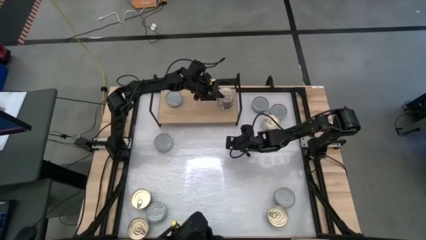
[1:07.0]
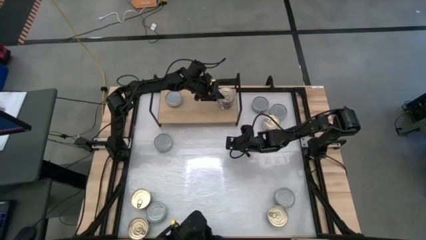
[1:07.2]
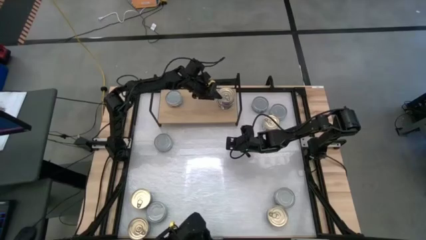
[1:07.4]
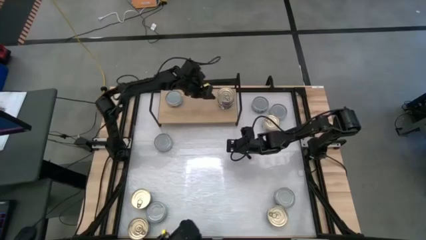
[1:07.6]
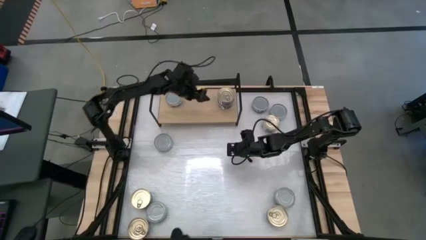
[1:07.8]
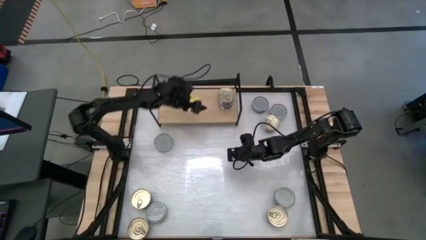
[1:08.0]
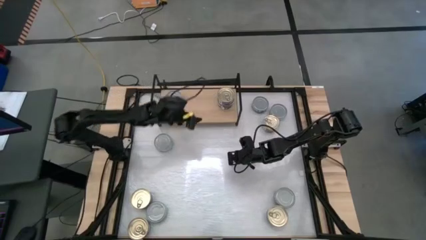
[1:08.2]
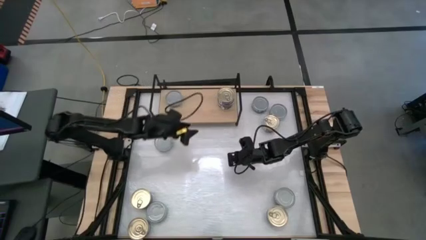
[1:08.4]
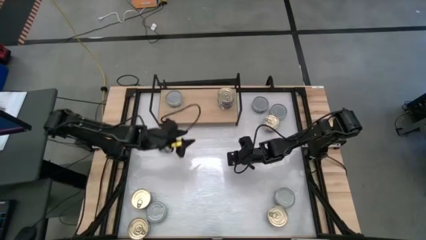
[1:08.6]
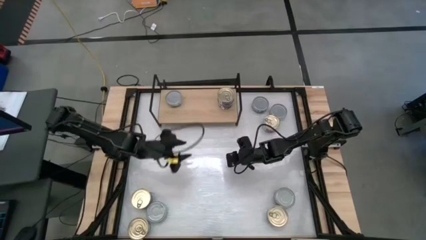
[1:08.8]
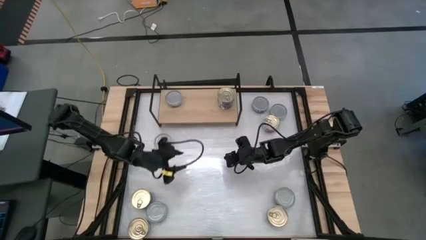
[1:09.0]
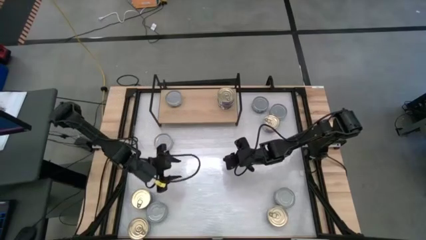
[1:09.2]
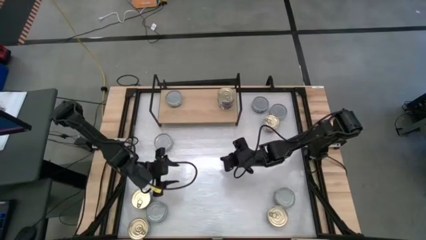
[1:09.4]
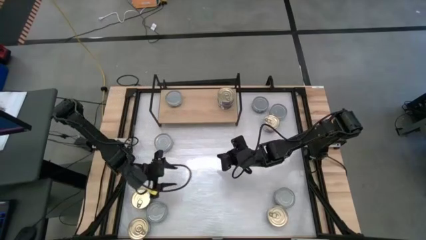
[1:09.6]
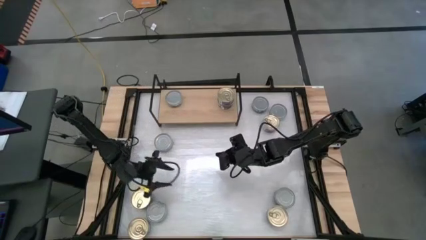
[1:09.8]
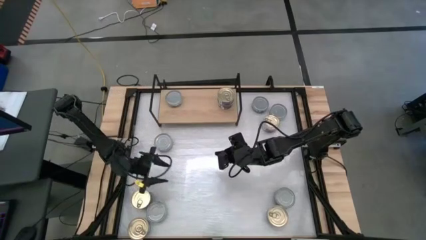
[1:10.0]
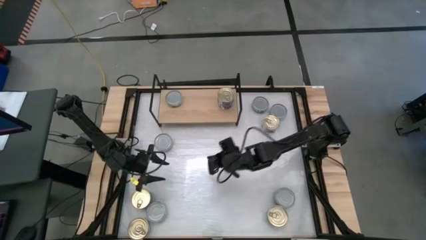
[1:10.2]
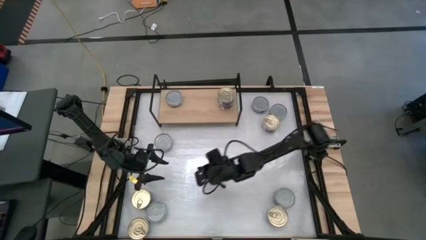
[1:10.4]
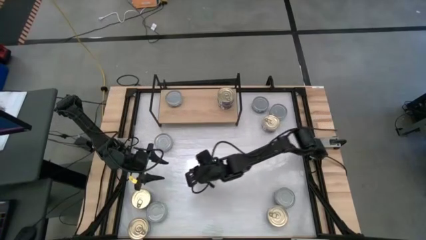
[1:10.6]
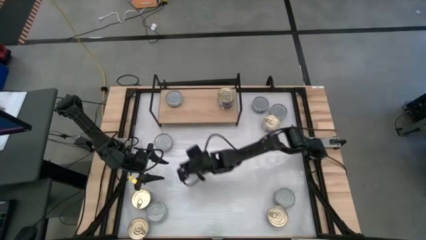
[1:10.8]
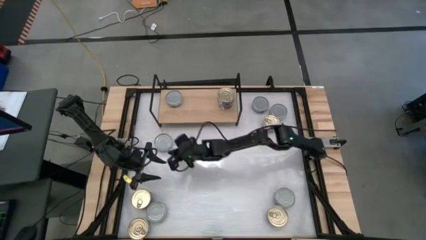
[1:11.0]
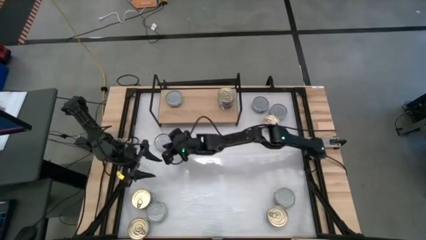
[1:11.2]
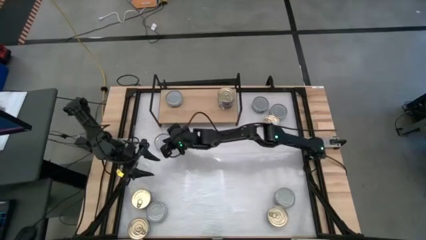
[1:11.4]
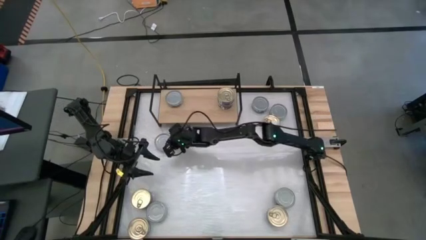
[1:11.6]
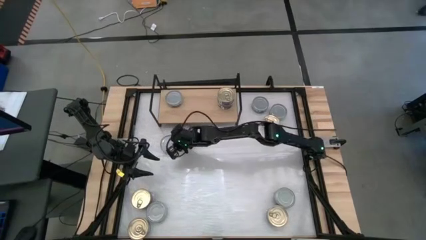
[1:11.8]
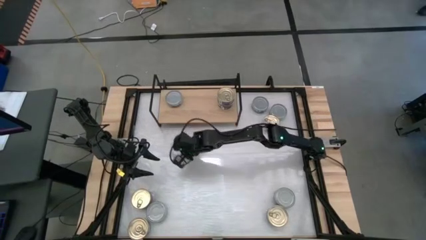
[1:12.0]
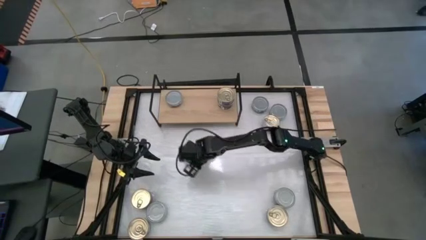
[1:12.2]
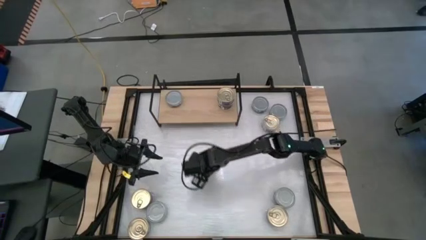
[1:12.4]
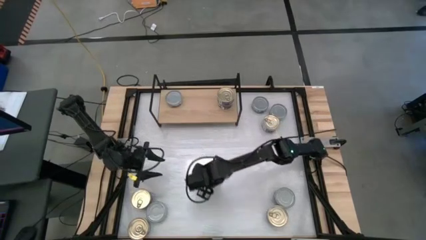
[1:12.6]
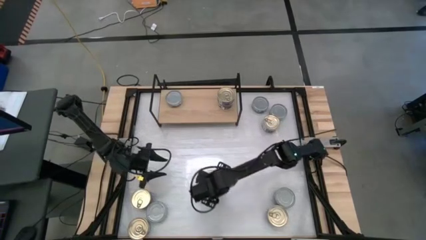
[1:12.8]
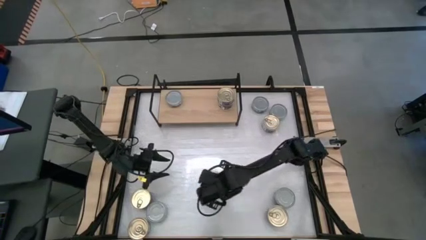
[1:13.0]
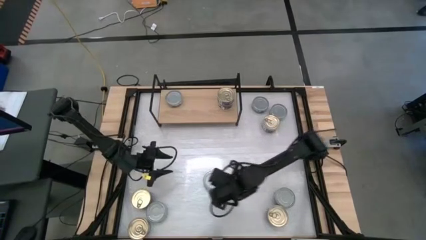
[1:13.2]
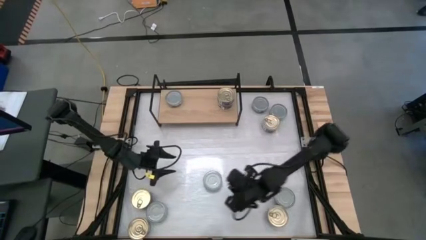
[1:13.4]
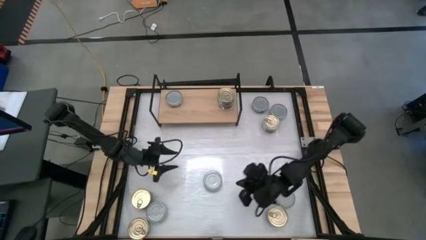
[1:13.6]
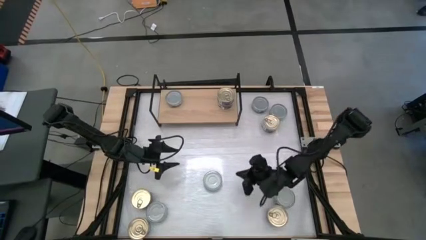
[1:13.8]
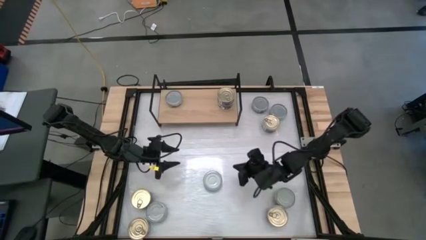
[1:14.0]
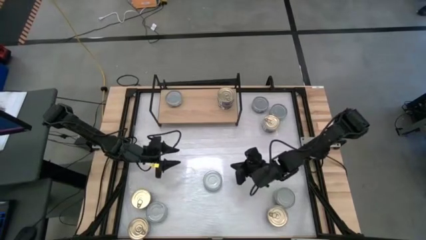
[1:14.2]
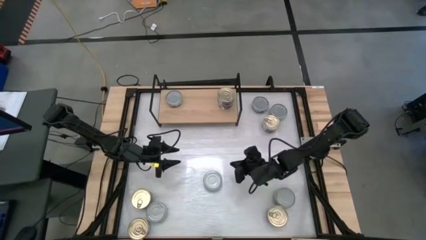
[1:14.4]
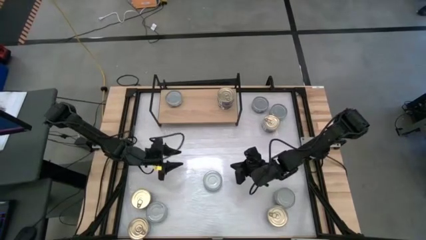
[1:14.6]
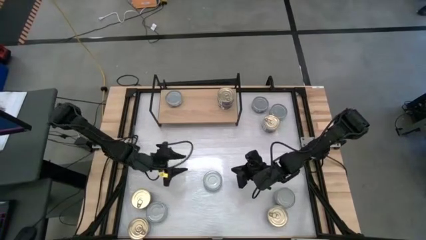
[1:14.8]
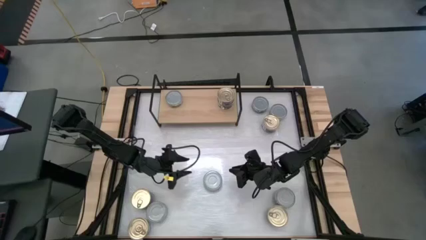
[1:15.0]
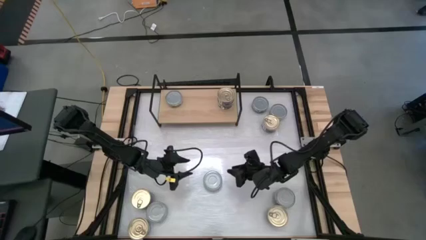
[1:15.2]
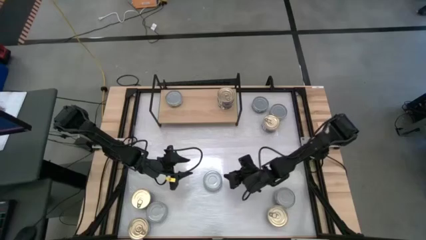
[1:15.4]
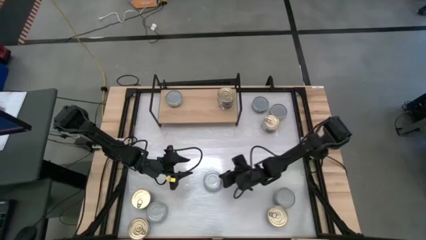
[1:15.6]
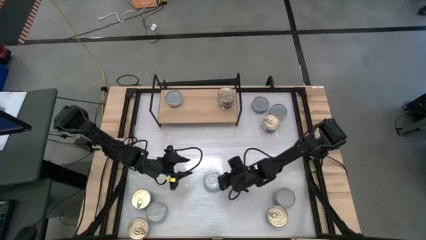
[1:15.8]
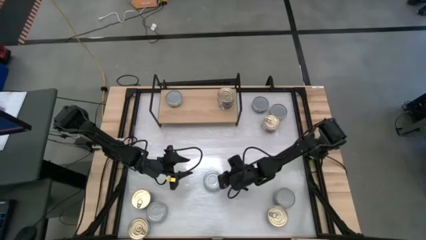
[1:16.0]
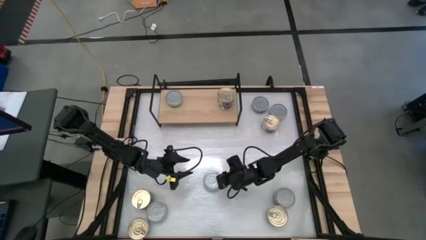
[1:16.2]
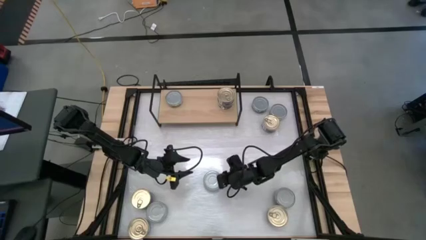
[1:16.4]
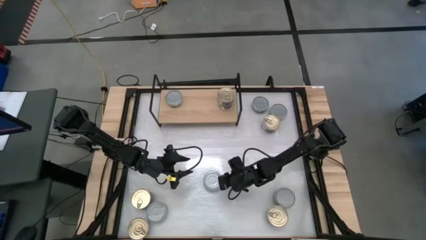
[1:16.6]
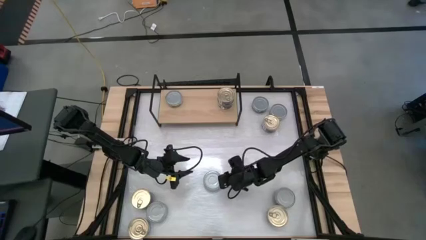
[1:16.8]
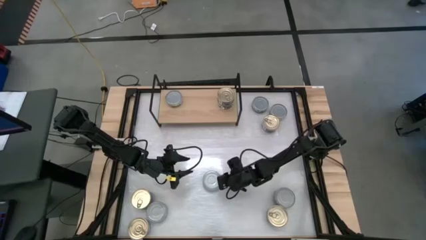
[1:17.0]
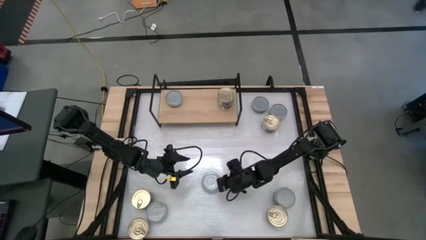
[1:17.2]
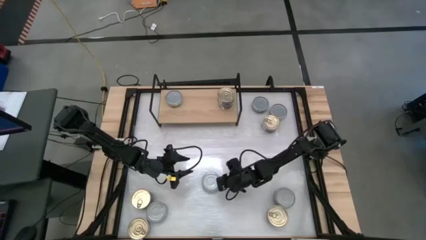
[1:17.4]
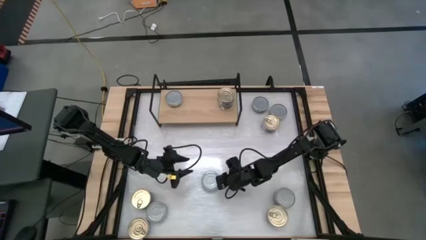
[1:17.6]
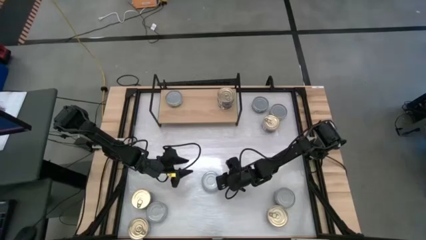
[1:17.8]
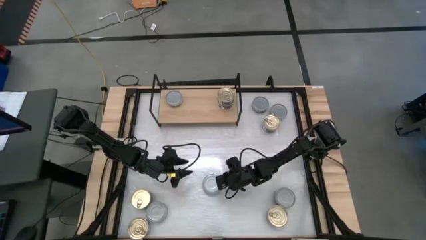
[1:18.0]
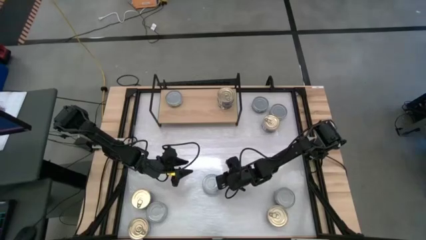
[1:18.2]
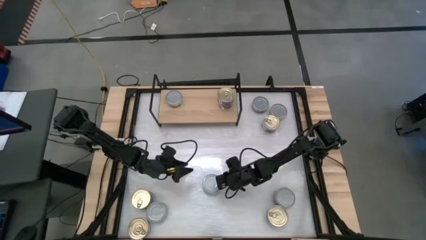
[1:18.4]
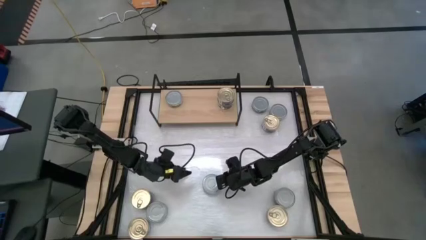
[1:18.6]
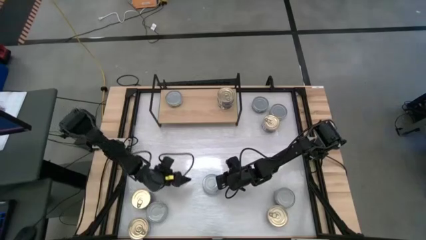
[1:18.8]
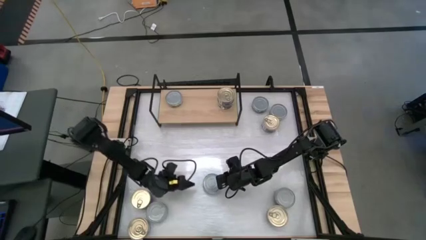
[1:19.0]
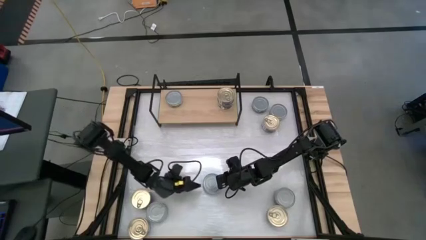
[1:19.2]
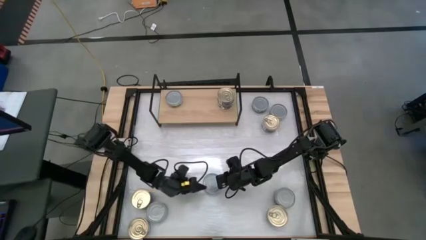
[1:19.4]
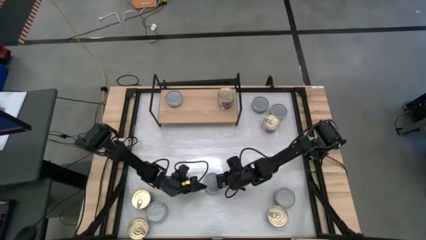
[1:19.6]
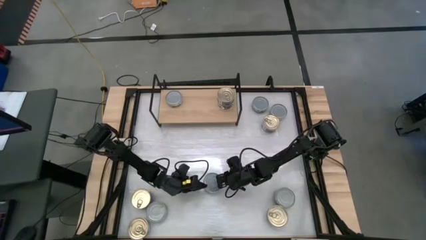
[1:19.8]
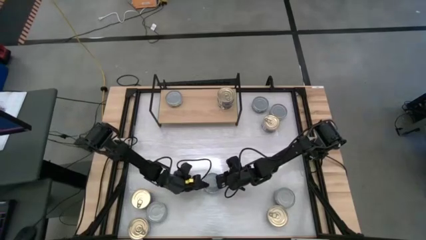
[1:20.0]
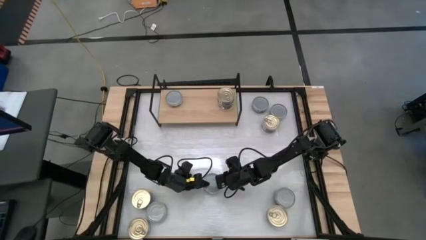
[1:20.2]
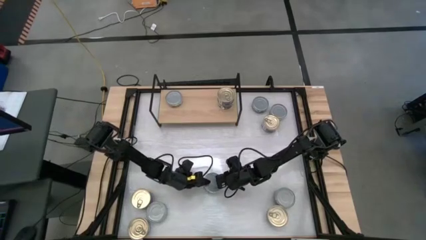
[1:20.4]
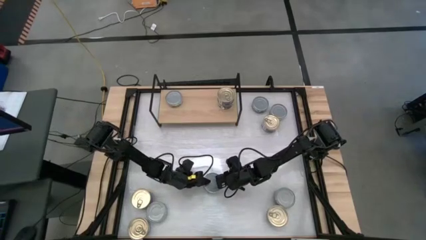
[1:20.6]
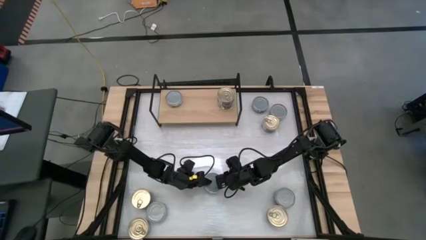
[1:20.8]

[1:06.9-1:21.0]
Task: Stack canned seafood by type on shelf
Stack the green tuna can on top of the green tuna can on the shelf

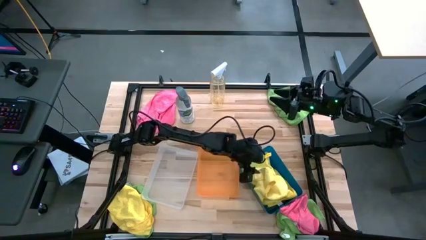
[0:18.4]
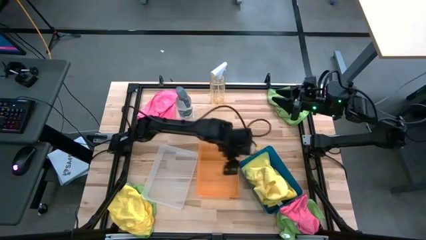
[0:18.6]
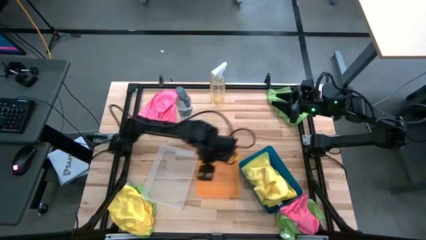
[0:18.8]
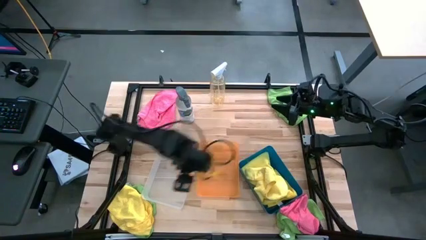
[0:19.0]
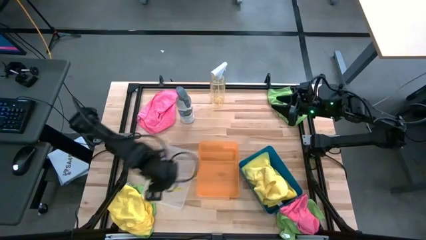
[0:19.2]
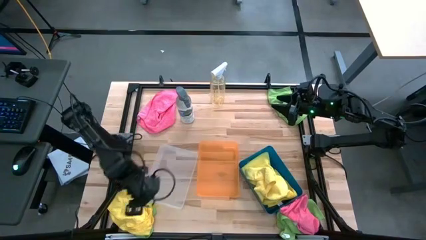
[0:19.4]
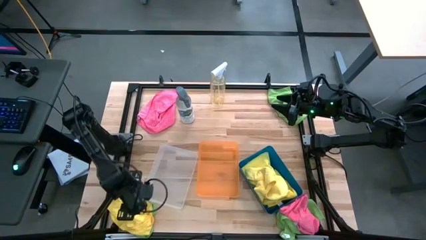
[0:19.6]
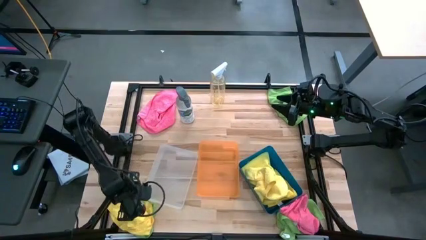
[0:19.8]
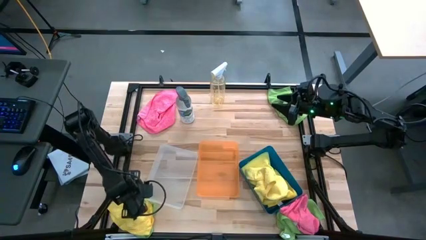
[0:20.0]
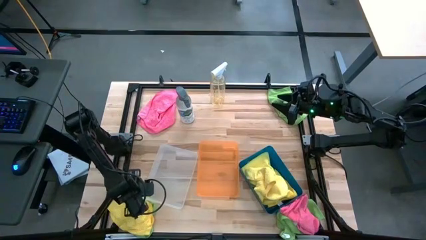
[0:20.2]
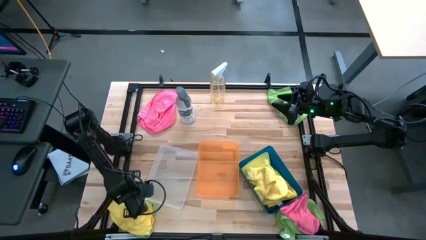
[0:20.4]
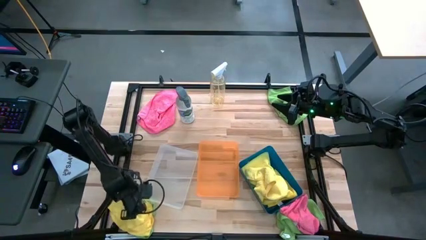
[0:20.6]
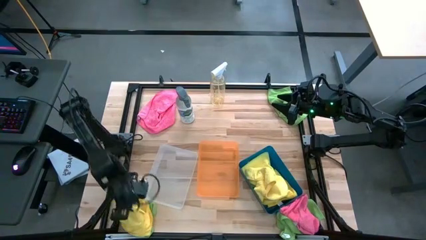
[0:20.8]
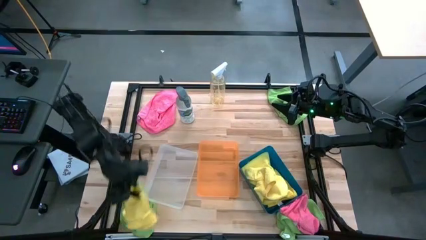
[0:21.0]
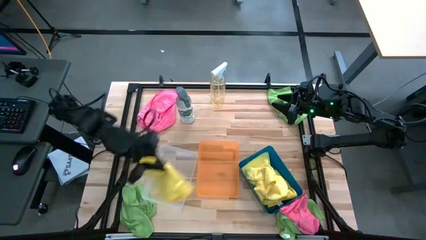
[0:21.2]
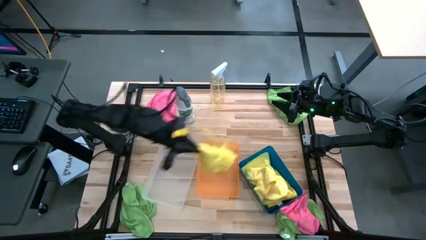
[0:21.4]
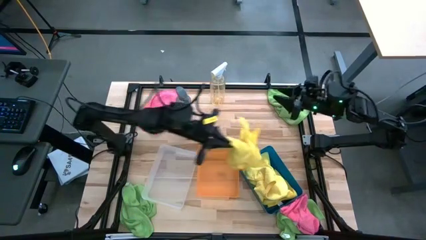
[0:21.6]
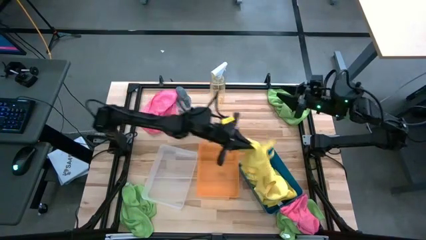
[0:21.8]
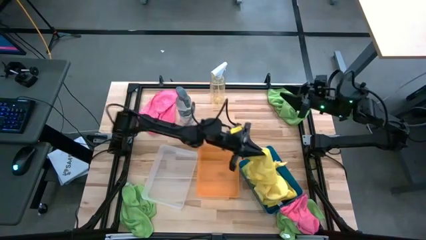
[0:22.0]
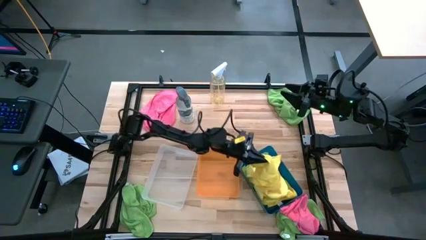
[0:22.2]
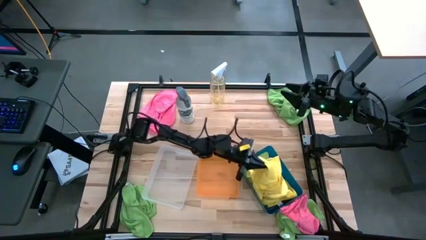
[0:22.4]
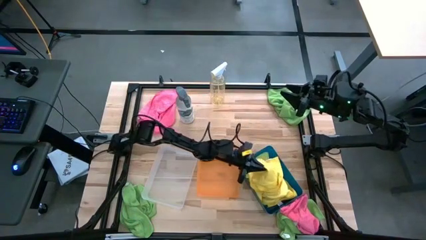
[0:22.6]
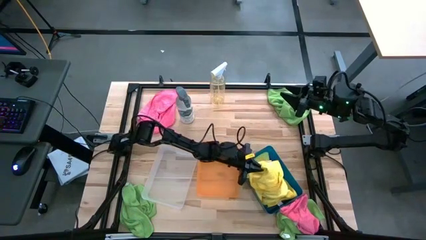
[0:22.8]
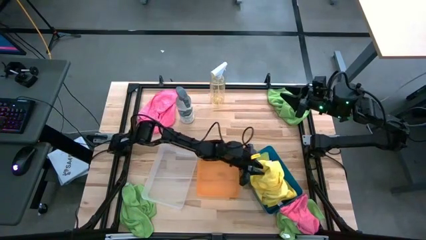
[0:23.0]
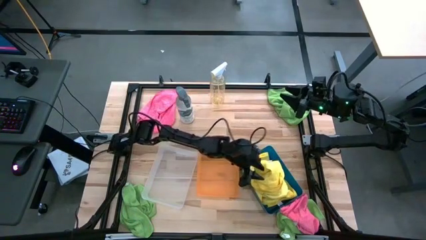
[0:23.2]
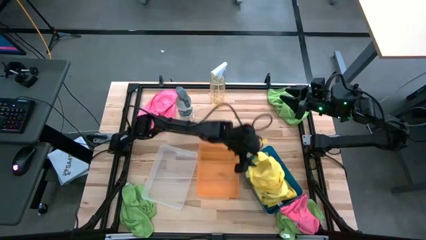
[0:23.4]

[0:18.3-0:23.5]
Task: Sort microfiber towel by color & place in baskets
Put the yellow microfiber cloth into the blue bin
